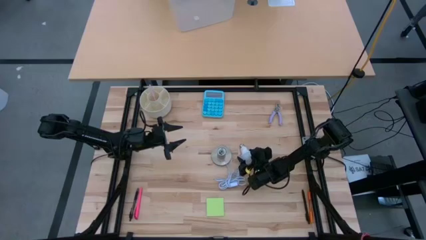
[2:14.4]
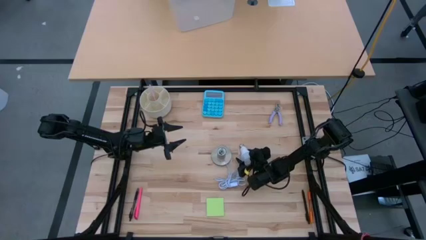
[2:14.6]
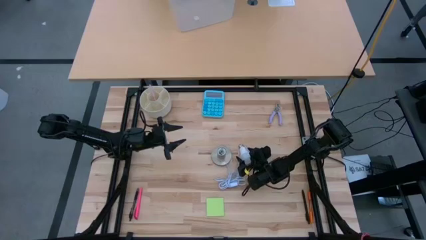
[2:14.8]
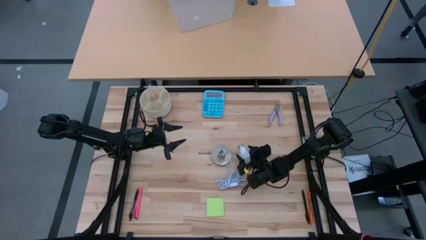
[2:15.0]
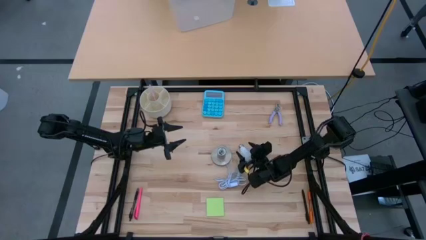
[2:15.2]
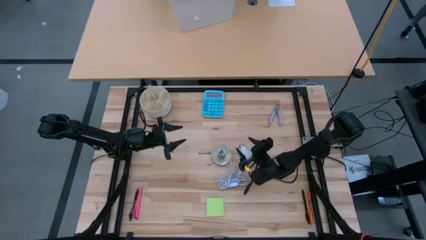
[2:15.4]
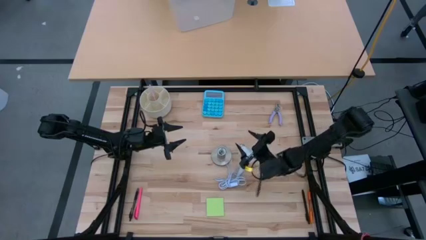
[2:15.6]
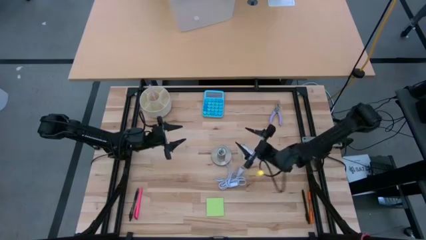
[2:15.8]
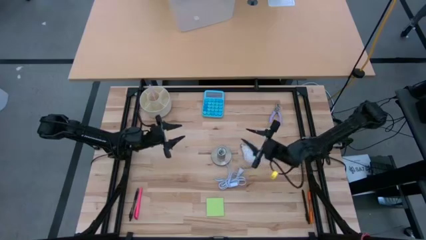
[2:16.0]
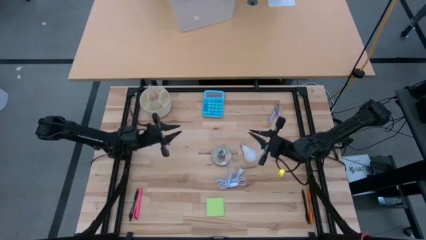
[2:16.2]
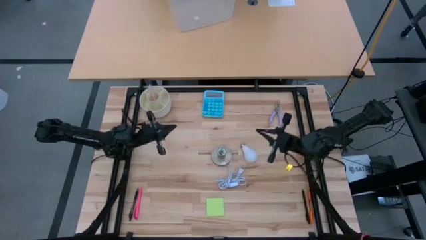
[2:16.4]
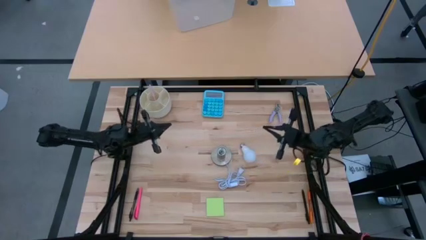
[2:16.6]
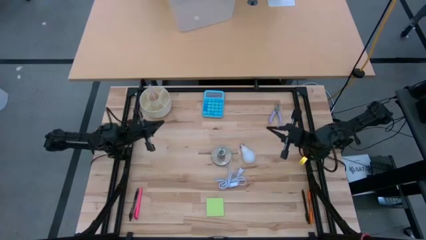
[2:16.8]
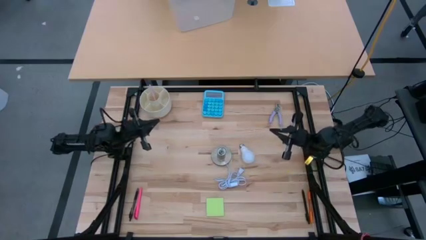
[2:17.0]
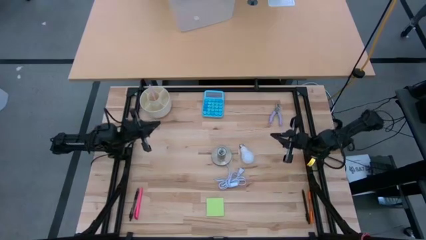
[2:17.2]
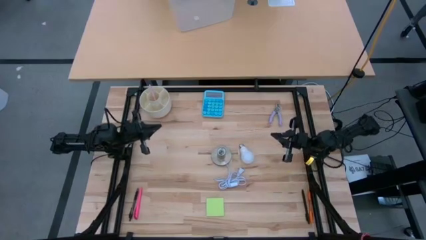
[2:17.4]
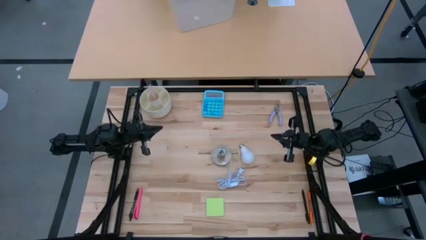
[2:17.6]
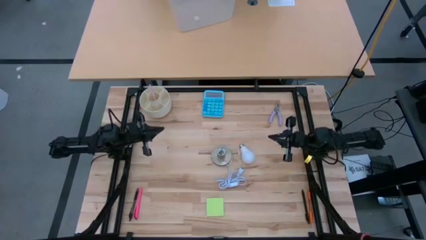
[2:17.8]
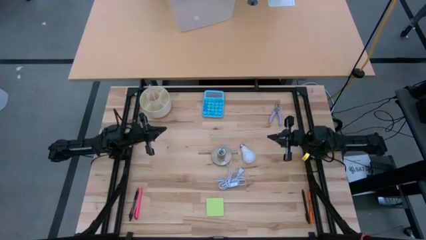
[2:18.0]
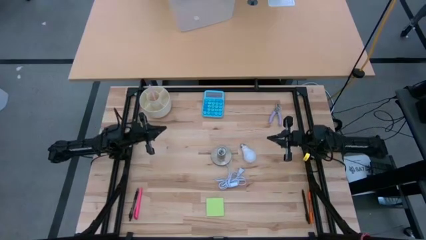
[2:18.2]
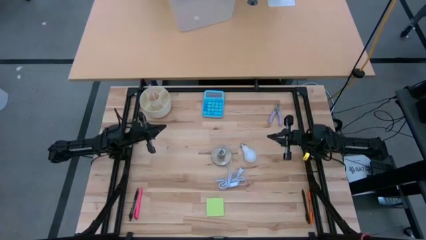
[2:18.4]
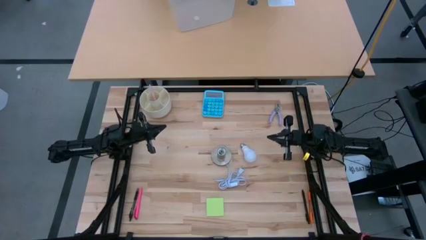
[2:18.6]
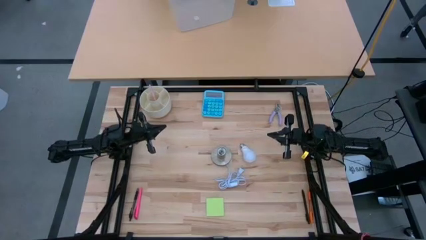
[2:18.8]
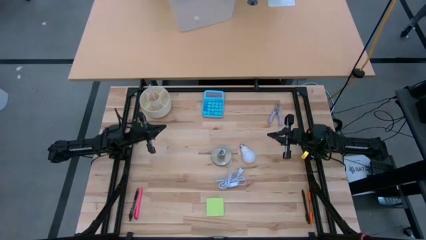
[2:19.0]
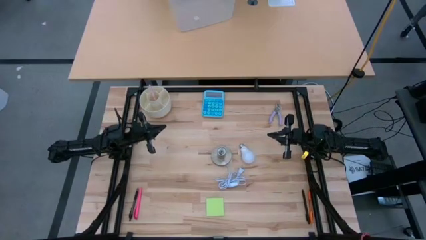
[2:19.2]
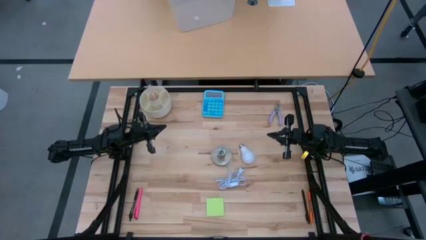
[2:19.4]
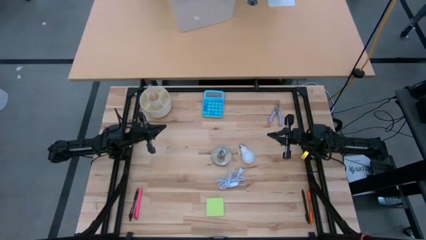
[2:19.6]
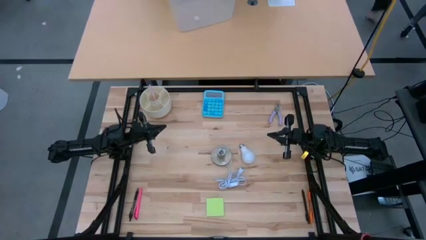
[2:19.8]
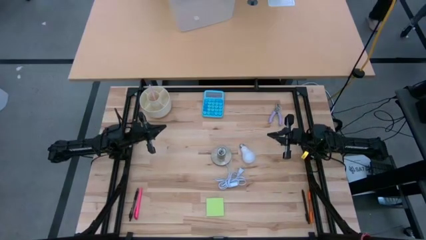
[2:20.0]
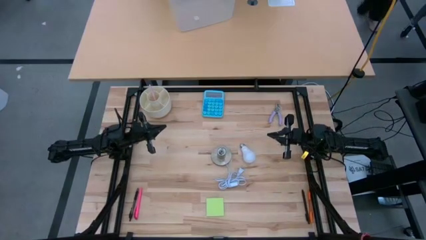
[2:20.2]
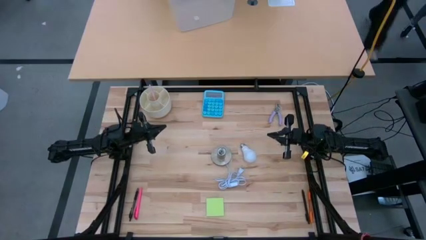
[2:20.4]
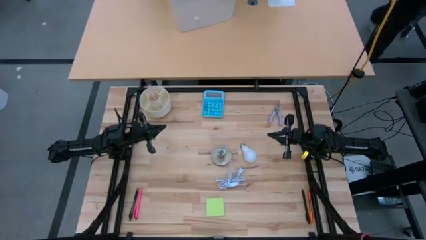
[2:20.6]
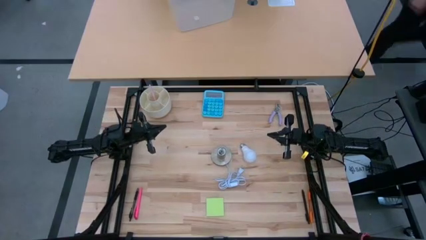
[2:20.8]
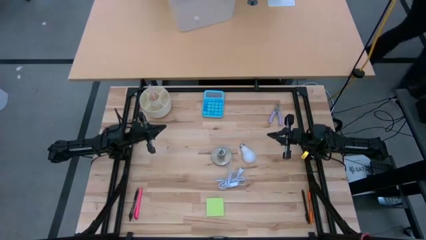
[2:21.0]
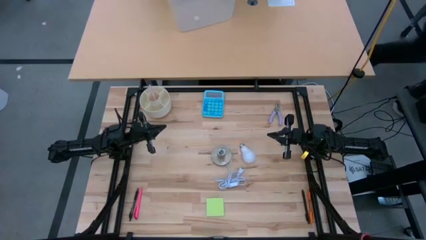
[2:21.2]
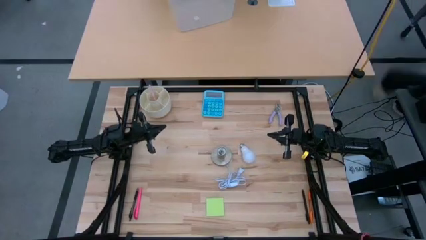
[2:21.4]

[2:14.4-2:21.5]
Task: Screw lightbulb
Return to Home Position

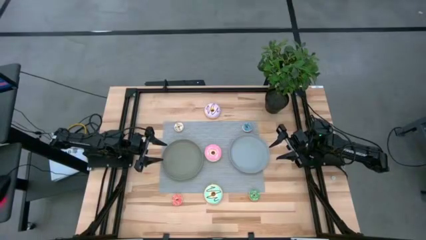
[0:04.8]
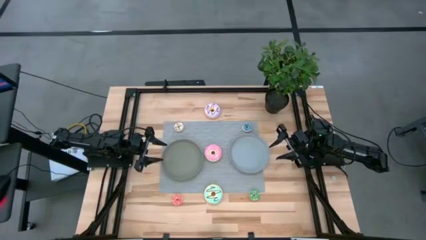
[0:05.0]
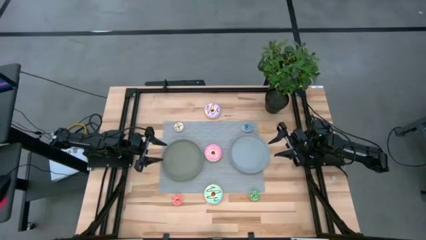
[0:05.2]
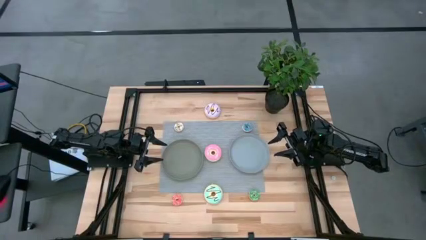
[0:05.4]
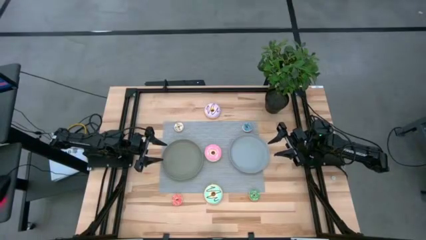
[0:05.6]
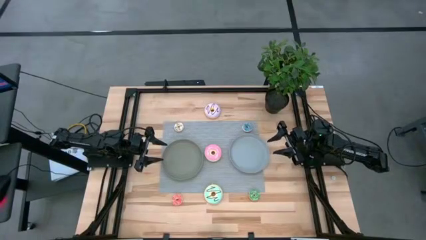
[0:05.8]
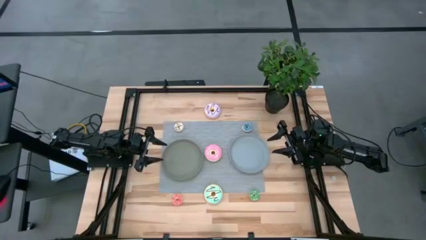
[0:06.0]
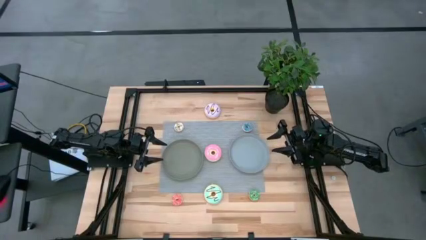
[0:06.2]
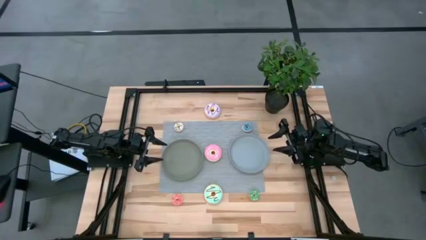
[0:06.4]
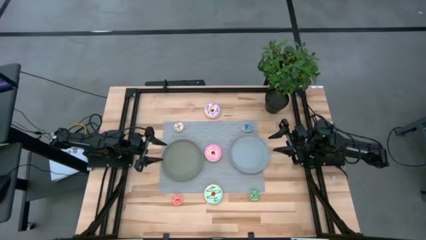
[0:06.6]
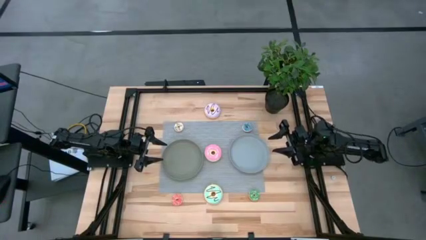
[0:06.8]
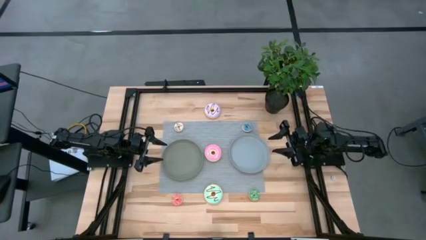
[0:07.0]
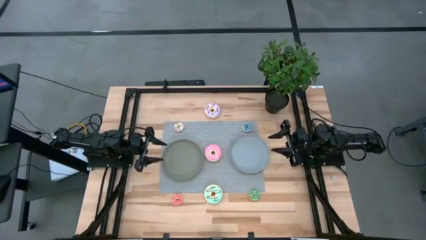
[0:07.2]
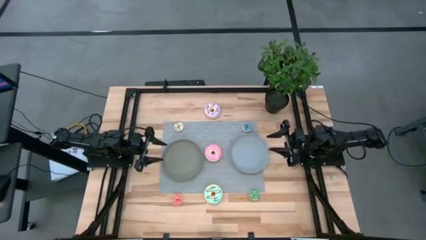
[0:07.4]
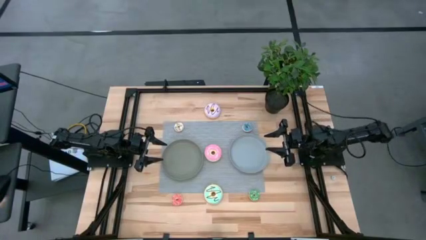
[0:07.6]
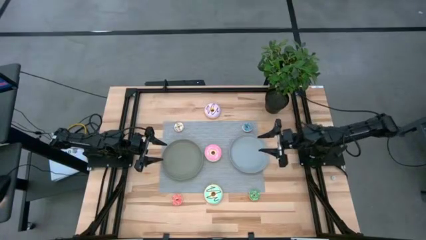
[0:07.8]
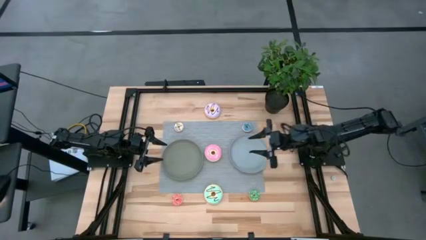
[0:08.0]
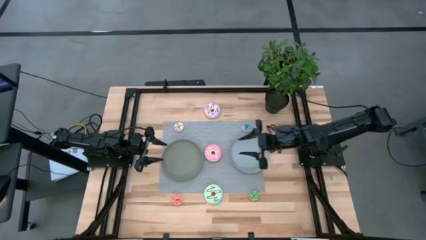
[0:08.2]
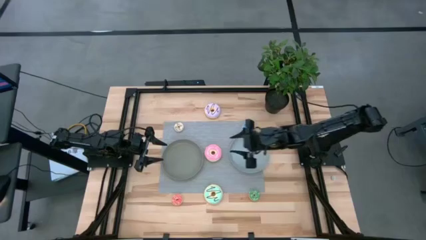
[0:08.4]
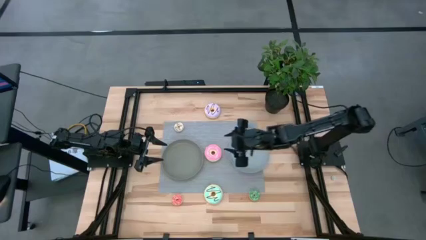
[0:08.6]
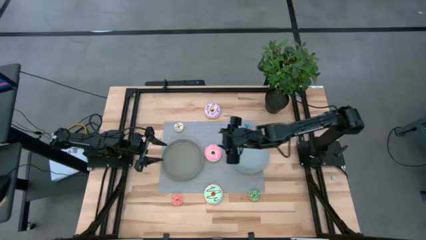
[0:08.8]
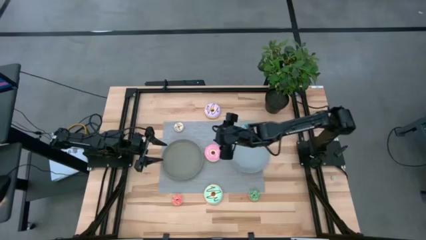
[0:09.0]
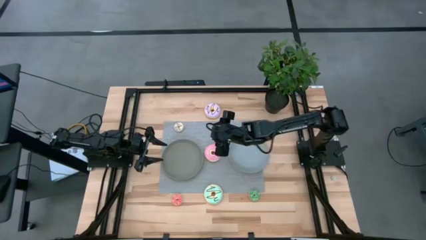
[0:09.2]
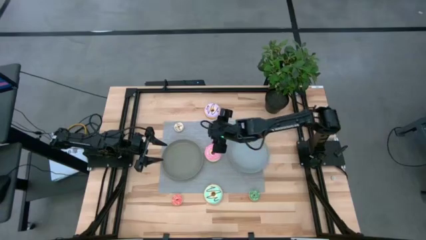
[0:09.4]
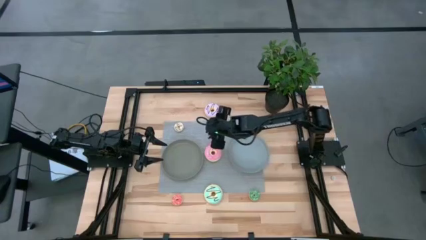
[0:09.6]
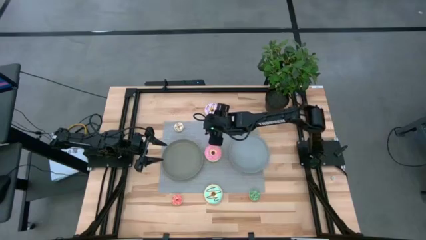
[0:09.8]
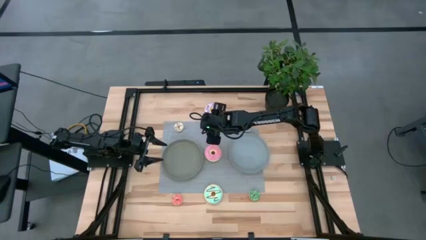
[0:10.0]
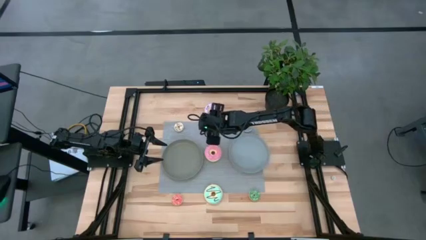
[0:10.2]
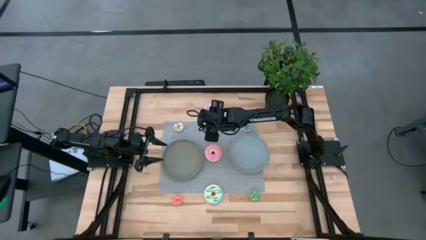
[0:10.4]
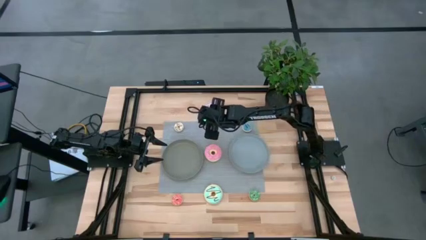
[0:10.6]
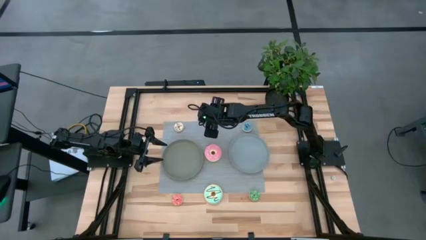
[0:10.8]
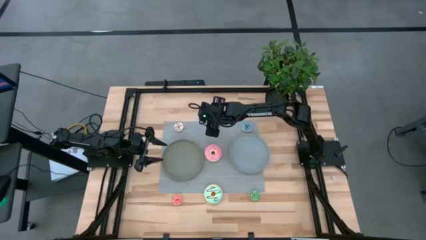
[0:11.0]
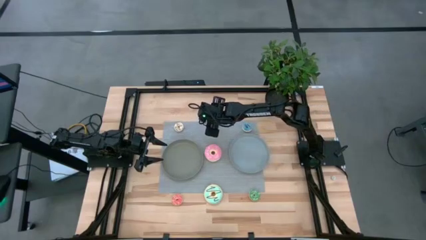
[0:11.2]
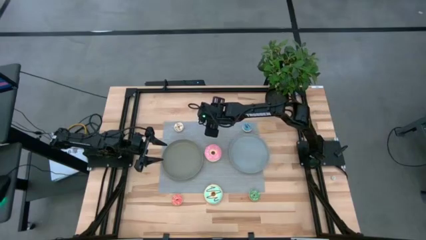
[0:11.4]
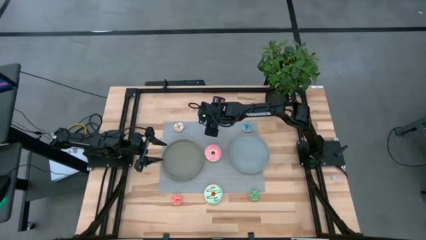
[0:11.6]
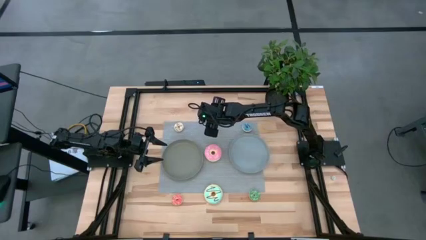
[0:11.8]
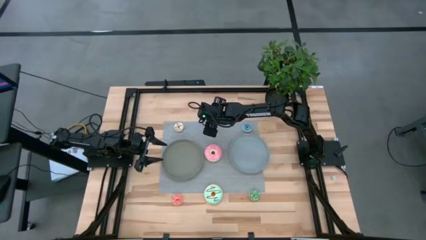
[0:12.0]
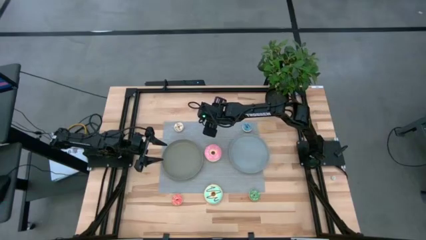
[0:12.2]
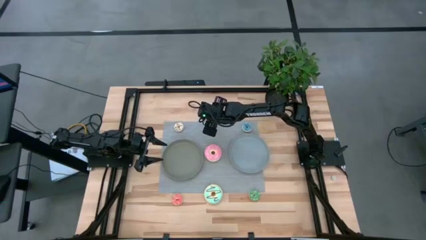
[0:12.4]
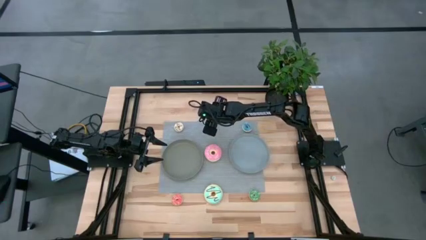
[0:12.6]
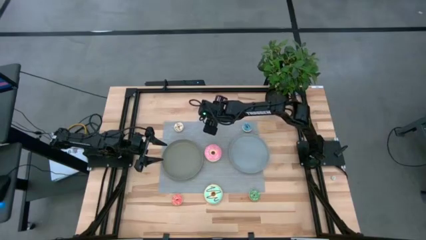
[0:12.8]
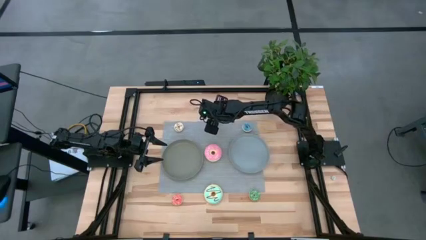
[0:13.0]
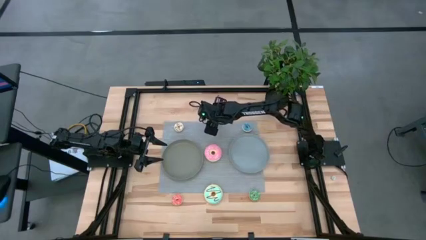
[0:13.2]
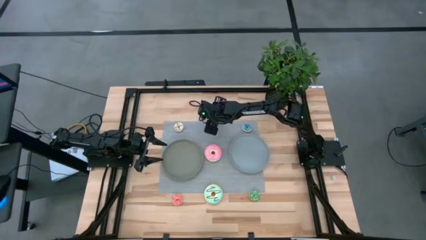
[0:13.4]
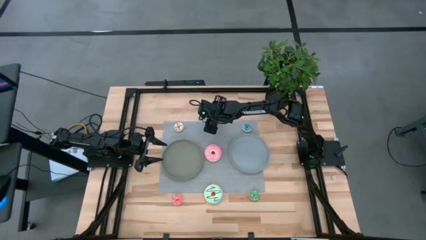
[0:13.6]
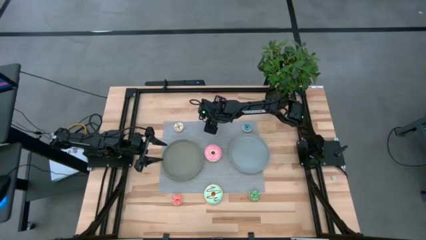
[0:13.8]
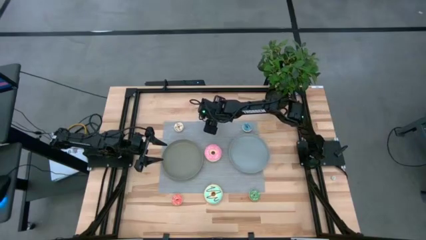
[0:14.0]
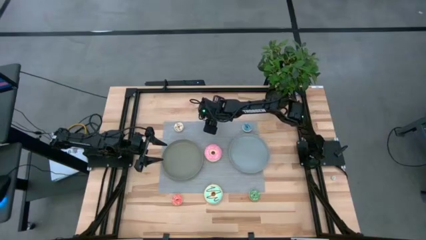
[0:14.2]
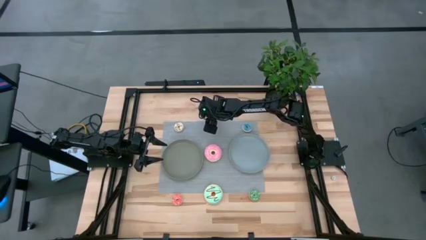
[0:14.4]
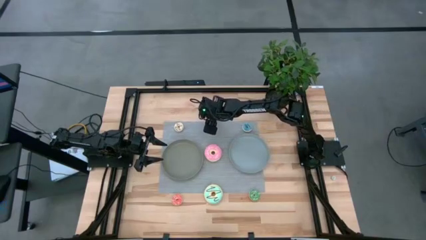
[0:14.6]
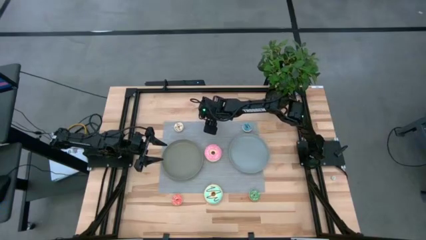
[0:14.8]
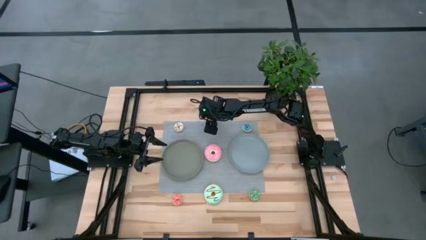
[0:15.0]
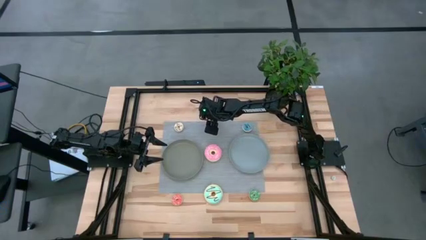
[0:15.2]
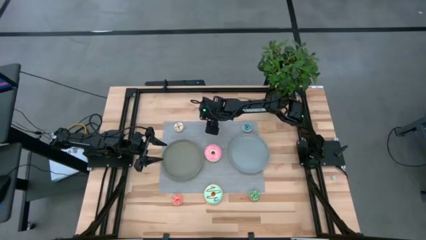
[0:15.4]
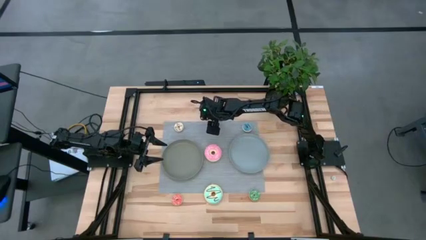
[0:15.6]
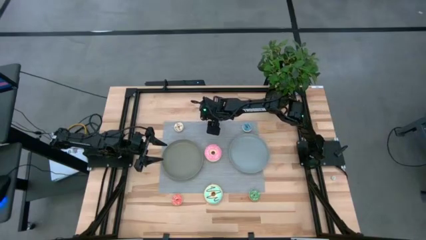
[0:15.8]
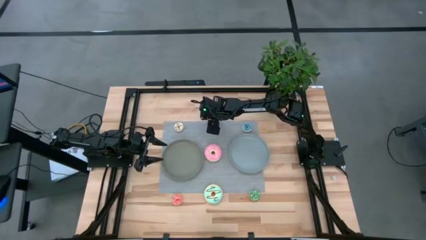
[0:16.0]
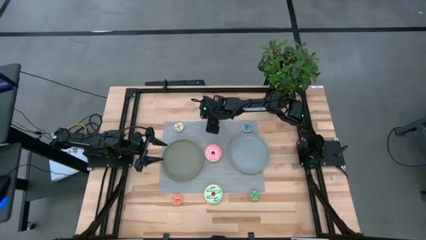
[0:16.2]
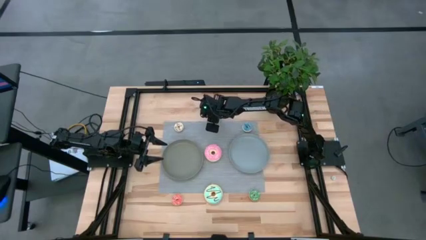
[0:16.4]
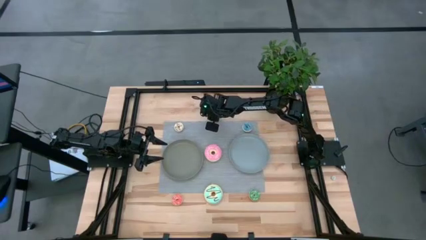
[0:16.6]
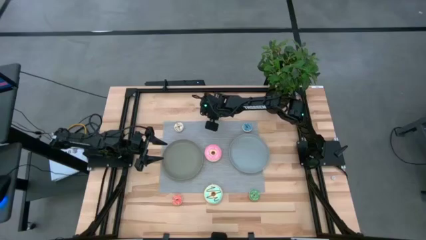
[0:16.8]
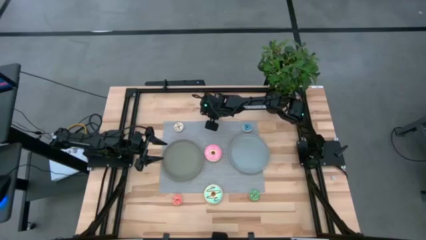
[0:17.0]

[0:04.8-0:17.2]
Task: Pick & Place donuts
Put the big purple donut into the blue plate
